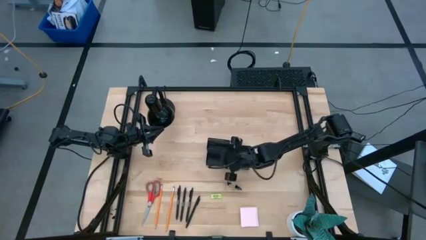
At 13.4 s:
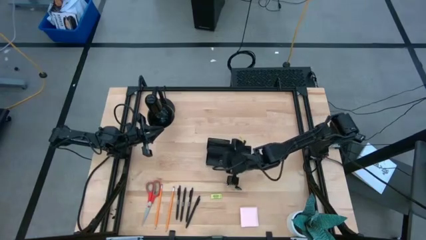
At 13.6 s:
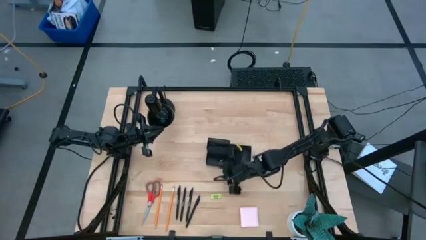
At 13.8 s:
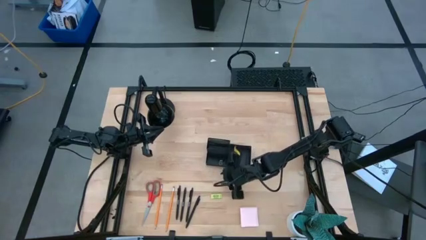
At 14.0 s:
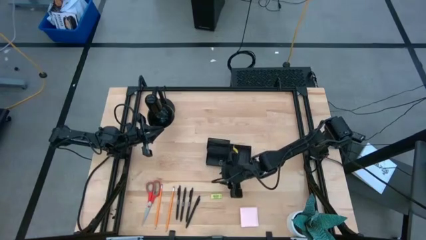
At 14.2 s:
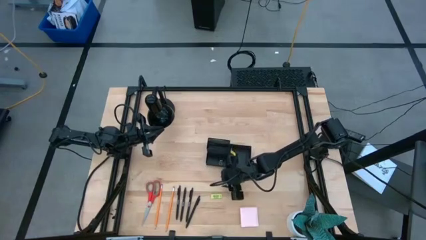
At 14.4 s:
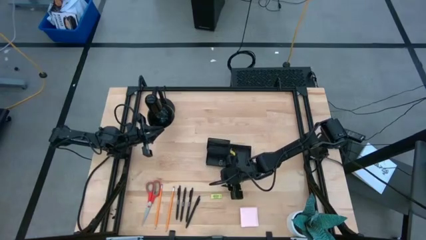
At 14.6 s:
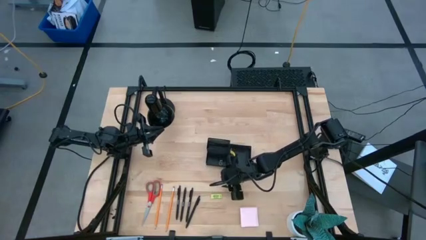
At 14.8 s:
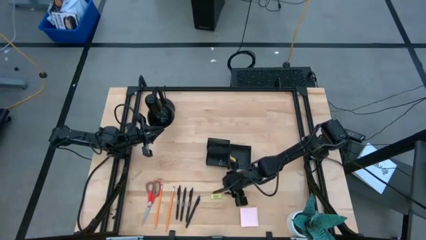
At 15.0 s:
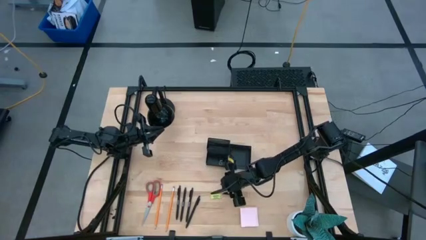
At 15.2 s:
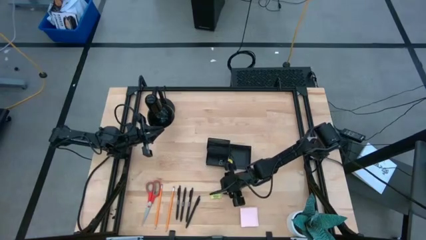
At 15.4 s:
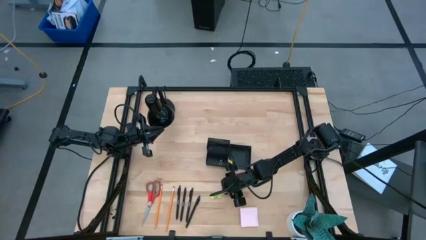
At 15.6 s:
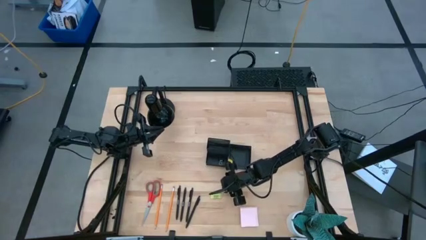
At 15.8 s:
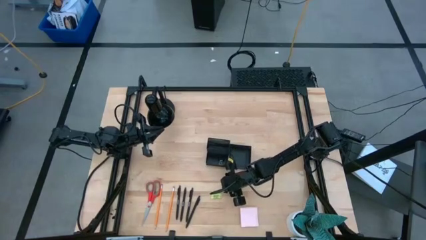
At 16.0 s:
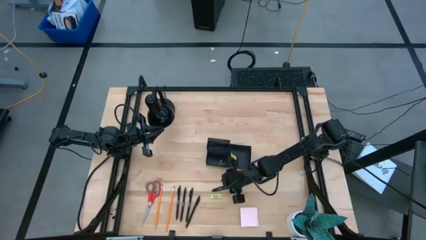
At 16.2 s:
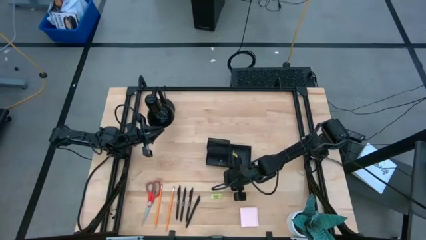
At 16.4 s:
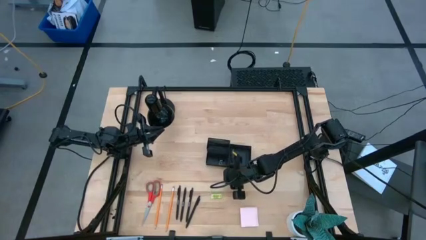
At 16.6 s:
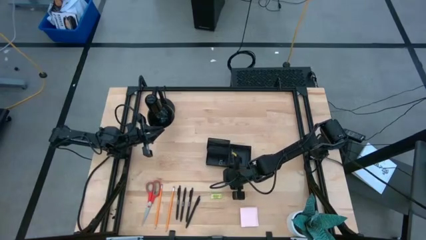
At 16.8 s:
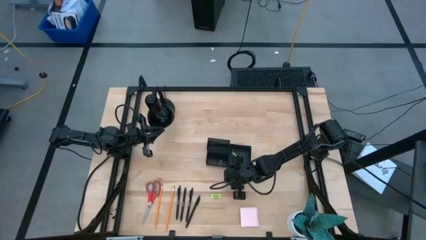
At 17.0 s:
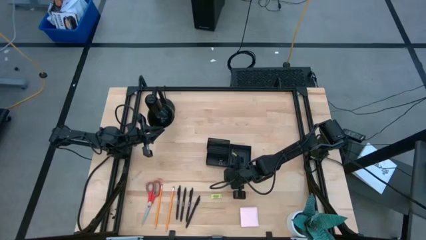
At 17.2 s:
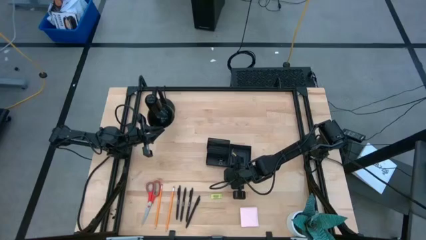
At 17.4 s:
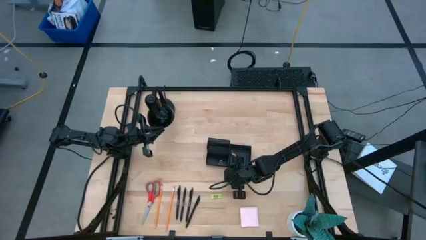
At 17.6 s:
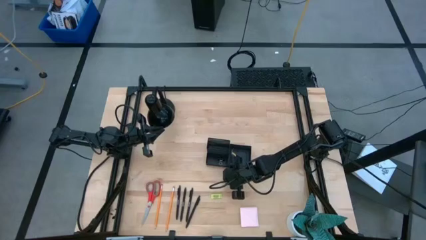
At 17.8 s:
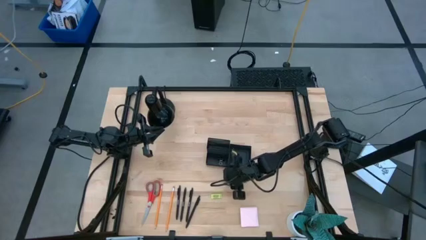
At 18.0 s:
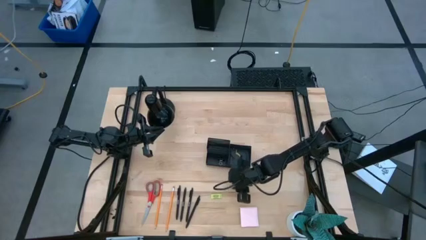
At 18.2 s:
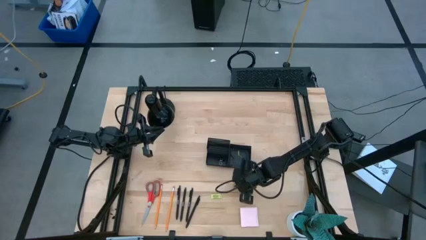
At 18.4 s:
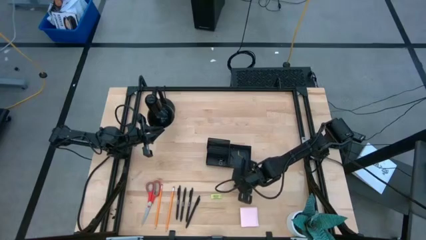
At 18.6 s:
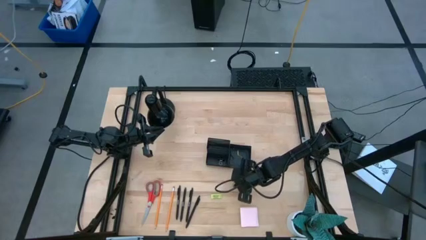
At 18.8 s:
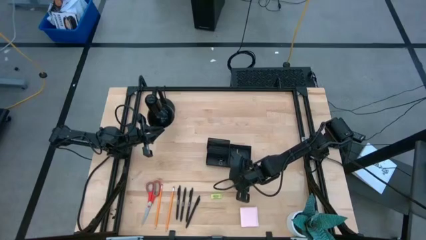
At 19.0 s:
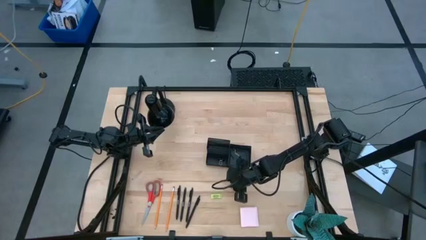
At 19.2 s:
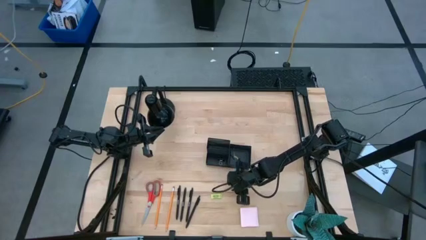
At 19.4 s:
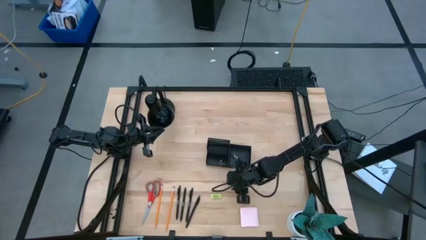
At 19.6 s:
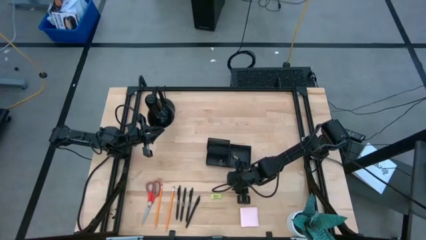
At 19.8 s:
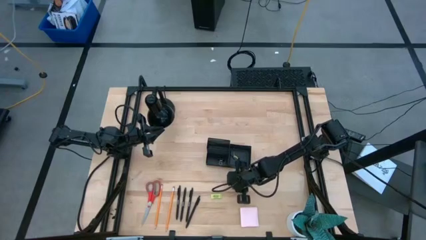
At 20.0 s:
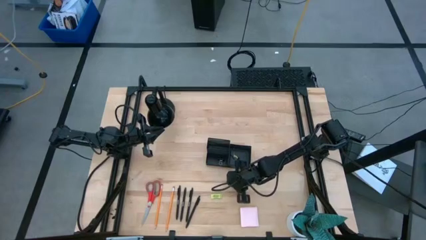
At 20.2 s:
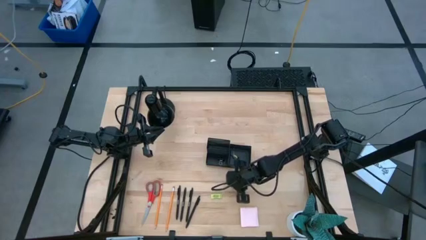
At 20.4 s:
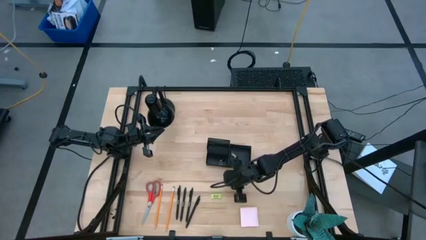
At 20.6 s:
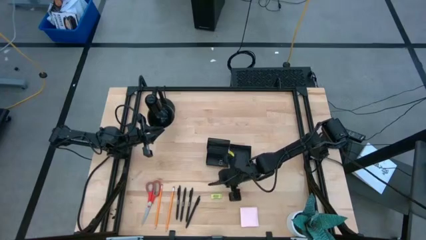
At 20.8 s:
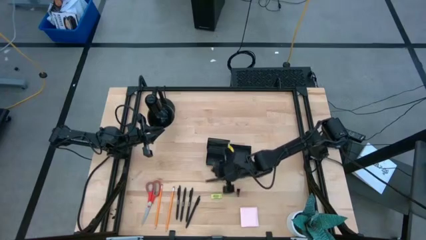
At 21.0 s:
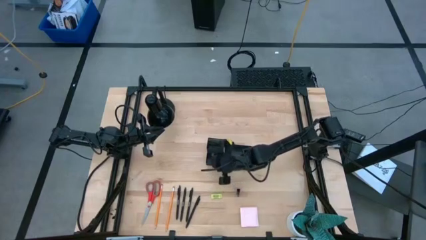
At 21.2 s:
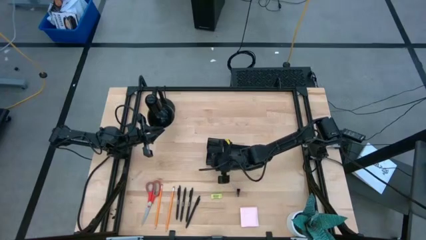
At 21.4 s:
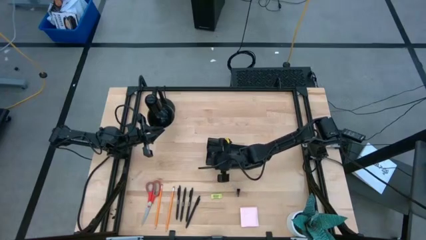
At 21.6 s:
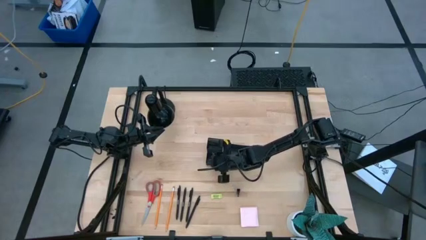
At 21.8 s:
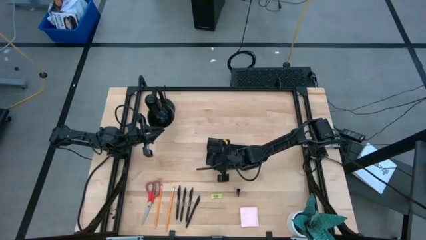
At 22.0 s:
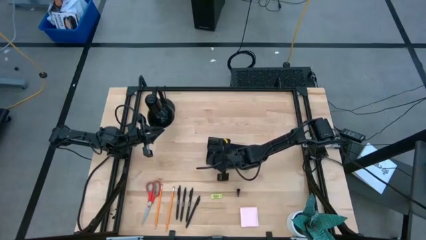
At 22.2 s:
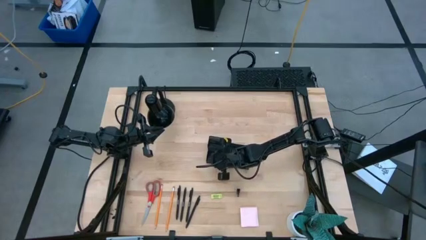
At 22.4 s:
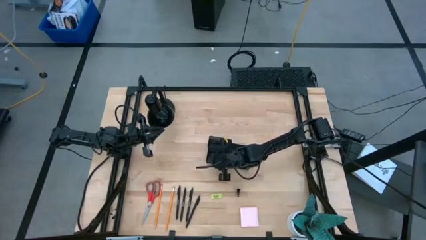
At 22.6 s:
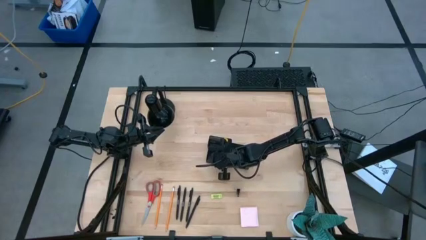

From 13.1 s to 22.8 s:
Task: Pick and place office supplies into organizer
Put the black binder clip into the black desk organizer

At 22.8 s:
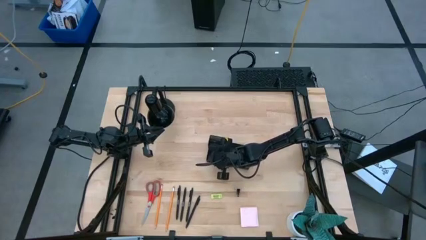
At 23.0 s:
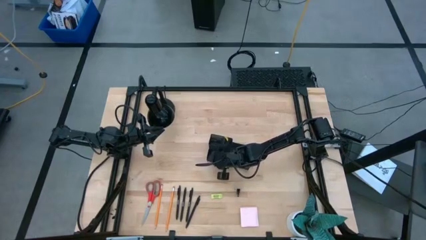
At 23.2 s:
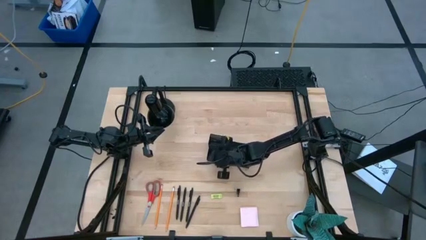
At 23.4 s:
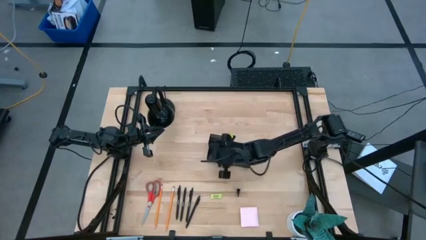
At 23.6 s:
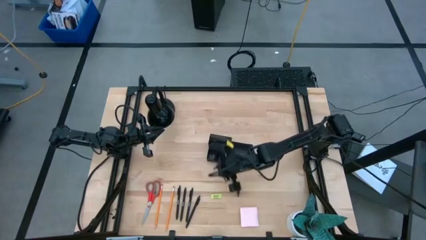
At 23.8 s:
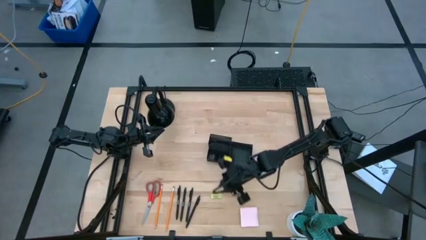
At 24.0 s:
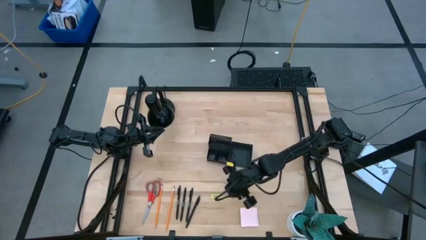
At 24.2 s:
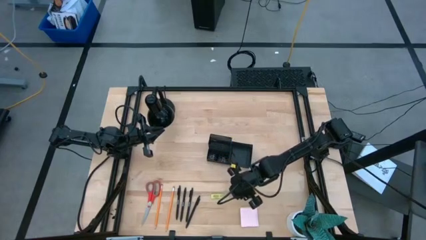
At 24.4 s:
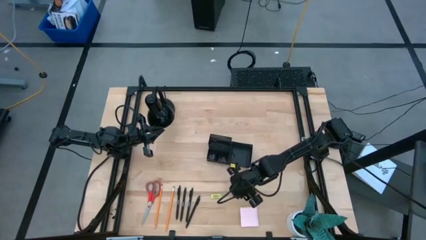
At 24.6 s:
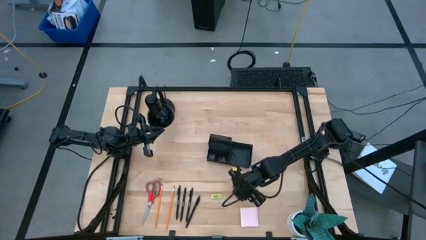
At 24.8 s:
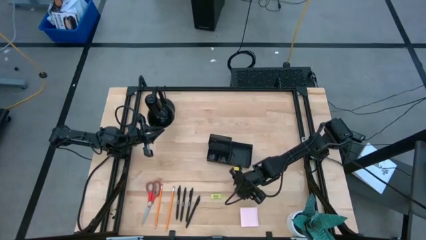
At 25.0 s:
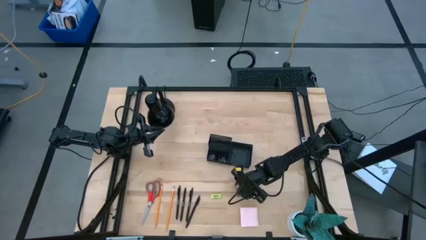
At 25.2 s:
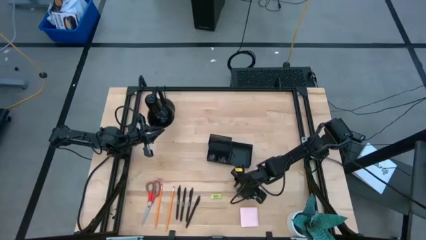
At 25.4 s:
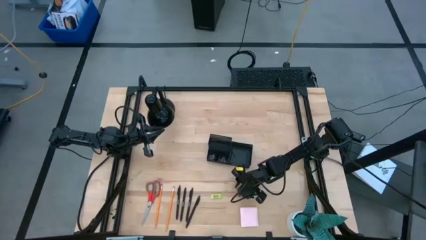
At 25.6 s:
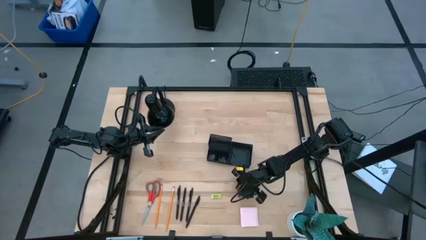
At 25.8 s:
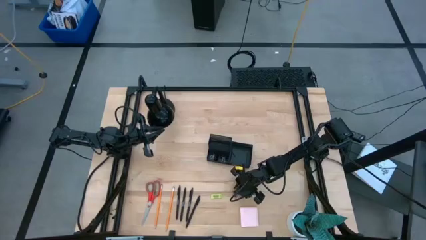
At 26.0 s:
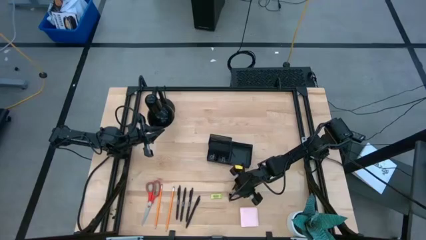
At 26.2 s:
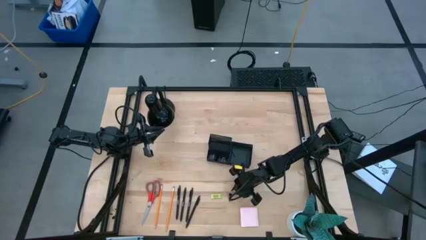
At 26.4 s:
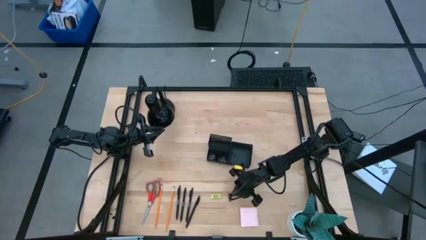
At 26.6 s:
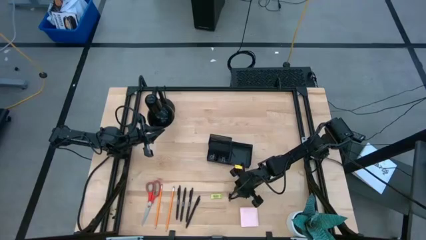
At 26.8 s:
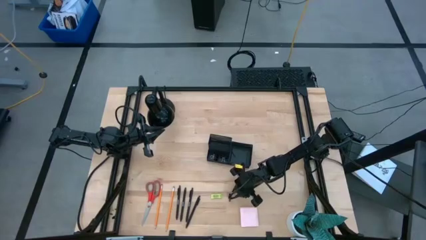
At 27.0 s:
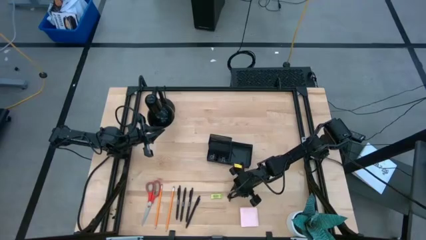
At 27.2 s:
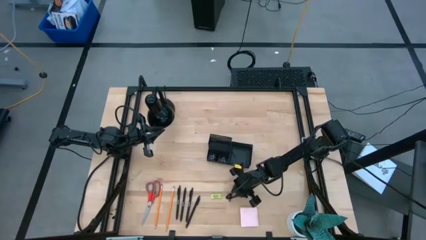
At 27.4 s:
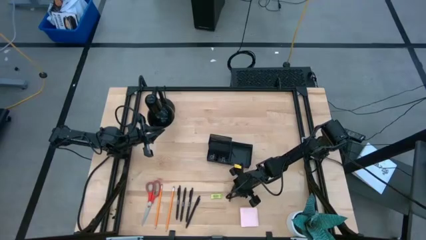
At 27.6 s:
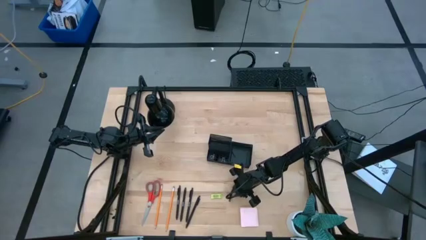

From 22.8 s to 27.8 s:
Put the binder clip into the black desk organizer

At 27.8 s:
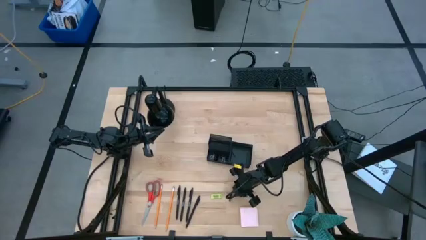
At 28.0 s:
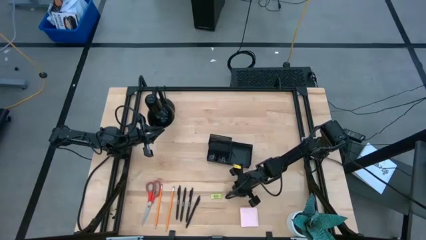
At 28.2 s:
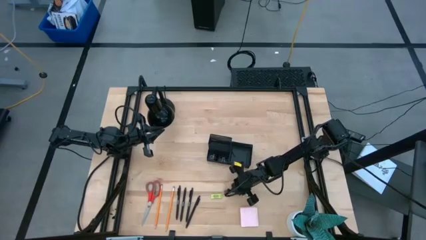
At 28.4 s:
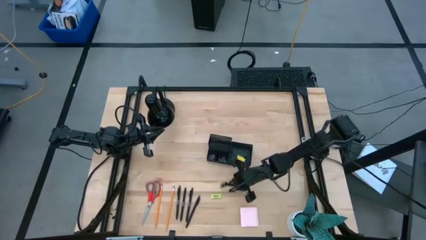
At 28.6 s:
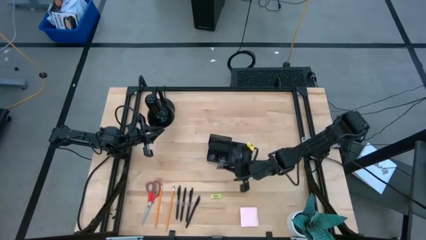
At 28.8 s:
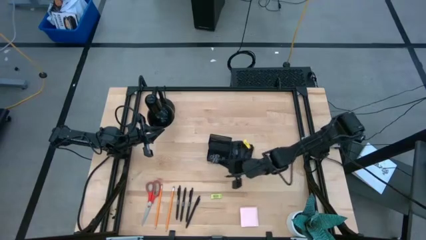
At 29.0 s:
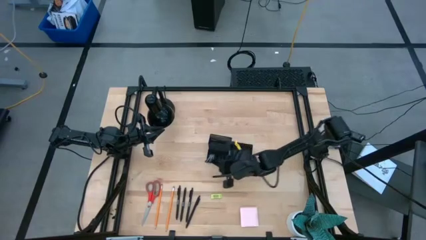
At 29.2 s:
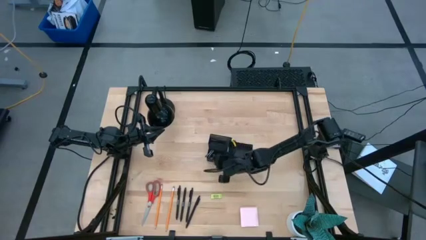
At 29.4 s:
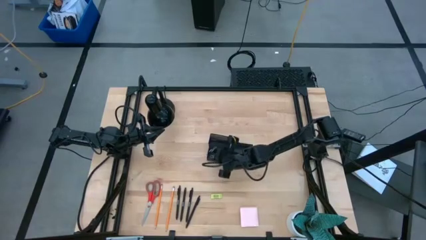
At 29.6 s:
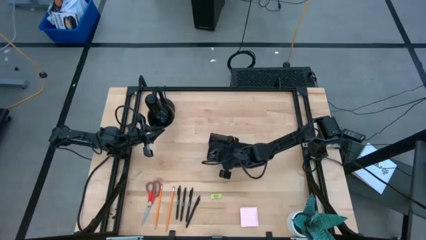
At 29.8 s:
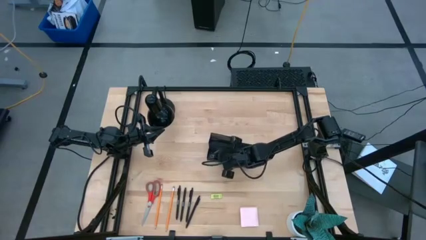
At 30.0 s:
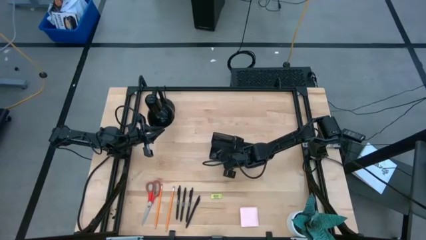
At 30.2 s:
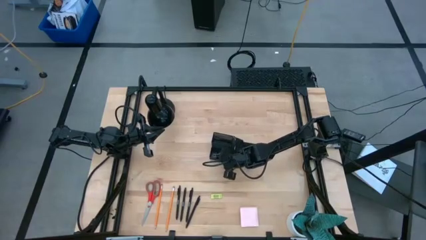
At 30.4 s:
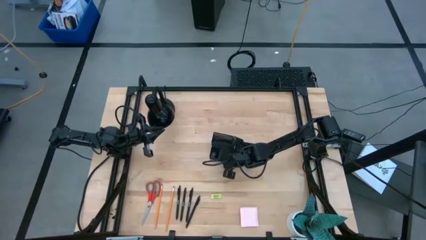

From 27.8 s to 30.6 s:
Put the binder clip into the black desk organizer
